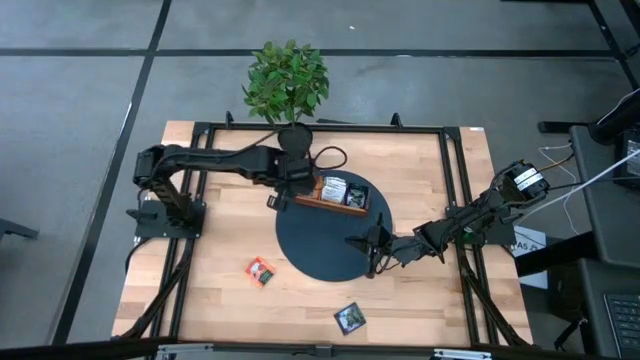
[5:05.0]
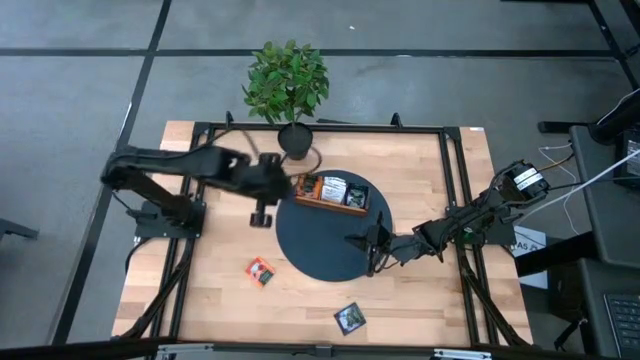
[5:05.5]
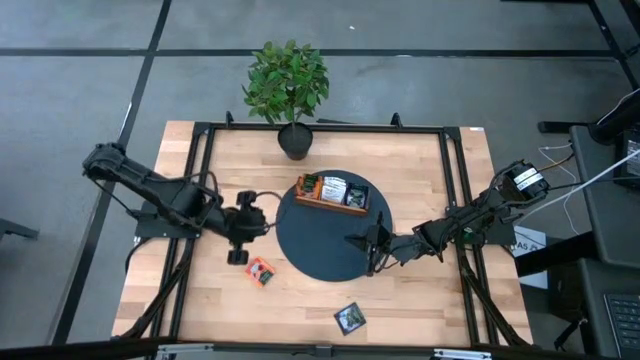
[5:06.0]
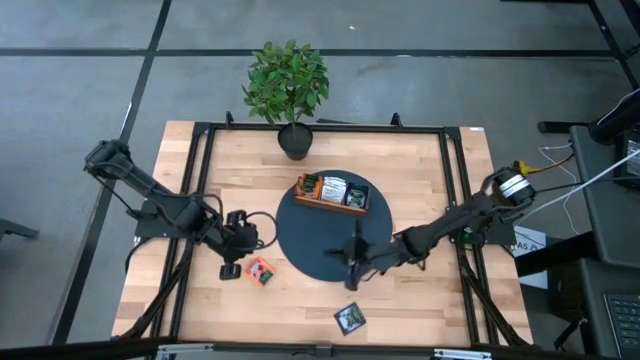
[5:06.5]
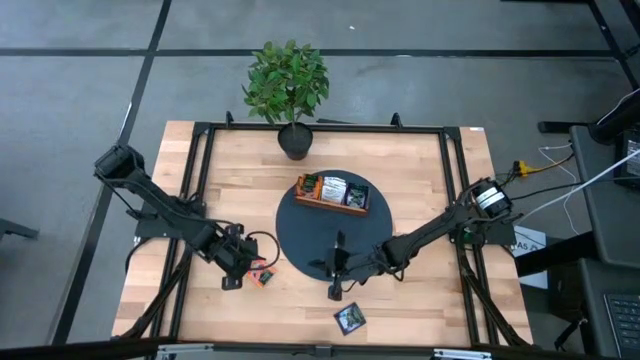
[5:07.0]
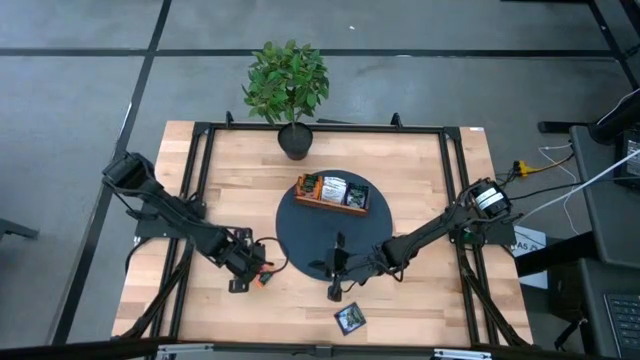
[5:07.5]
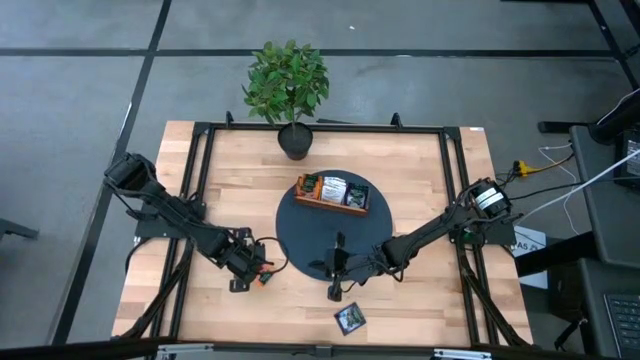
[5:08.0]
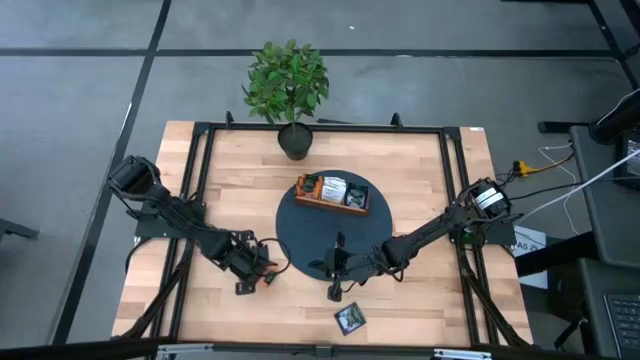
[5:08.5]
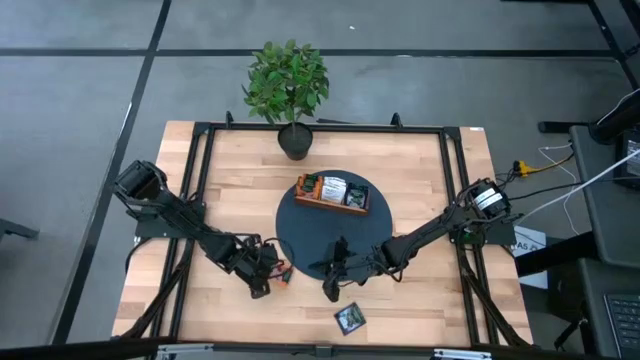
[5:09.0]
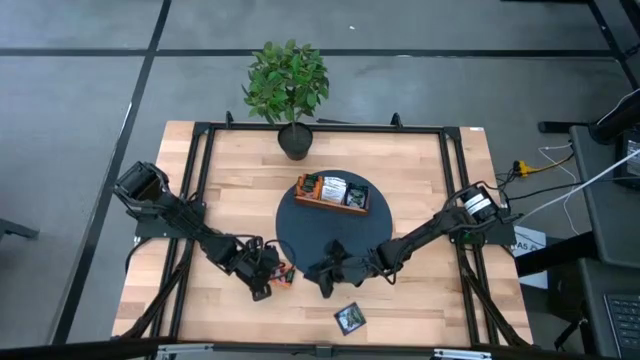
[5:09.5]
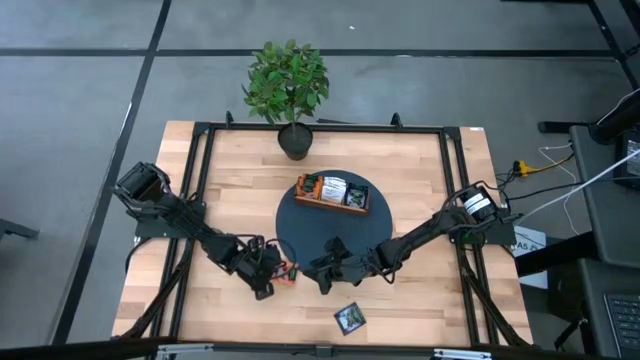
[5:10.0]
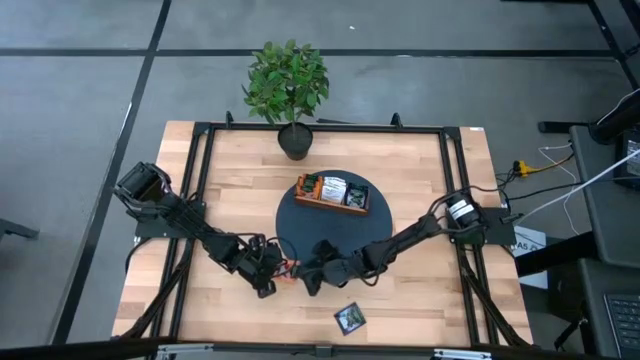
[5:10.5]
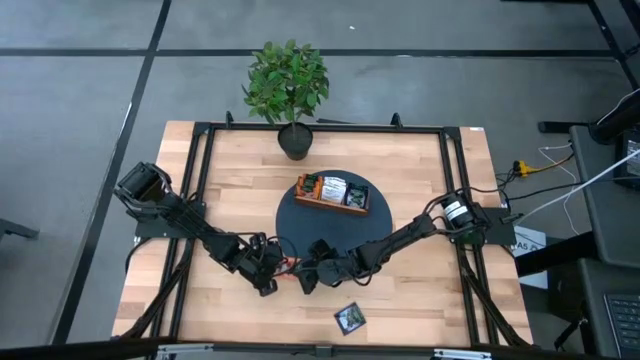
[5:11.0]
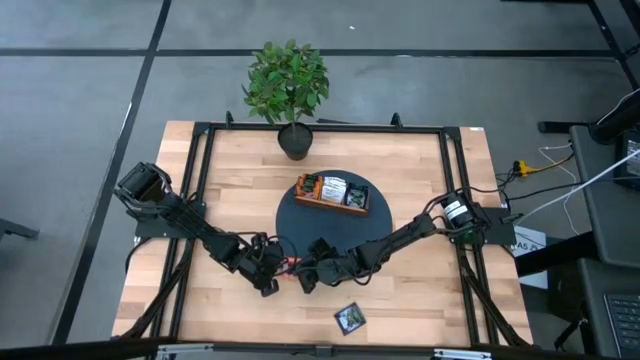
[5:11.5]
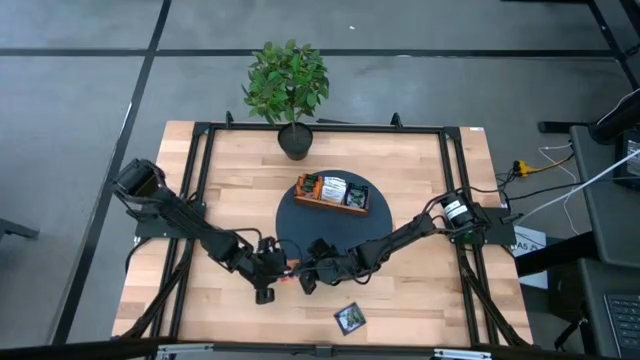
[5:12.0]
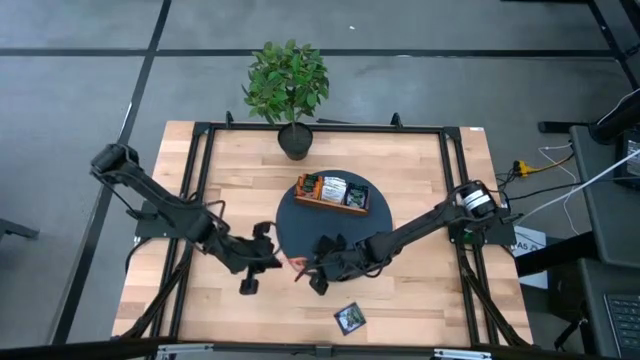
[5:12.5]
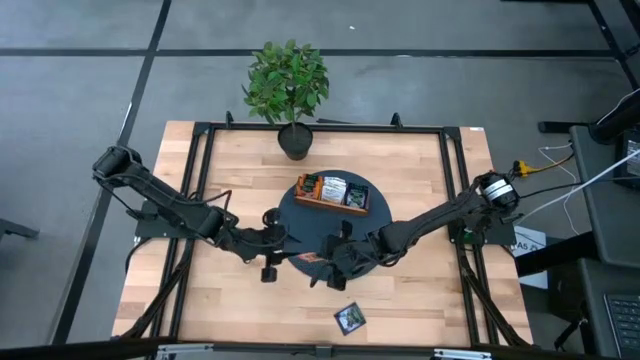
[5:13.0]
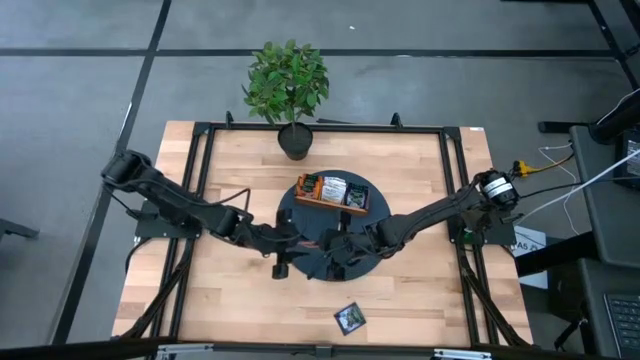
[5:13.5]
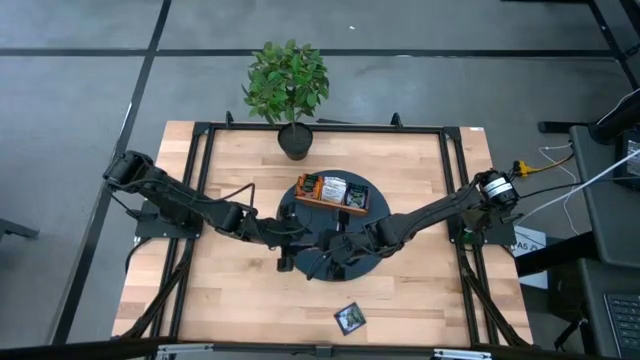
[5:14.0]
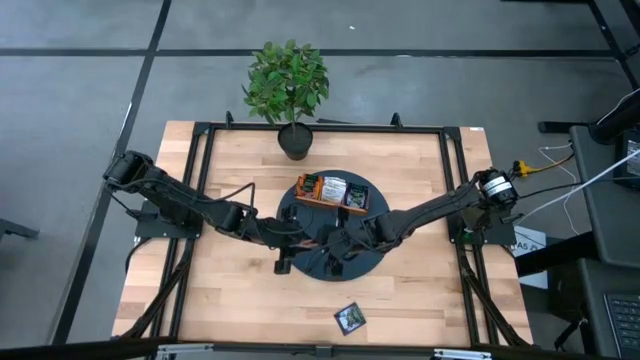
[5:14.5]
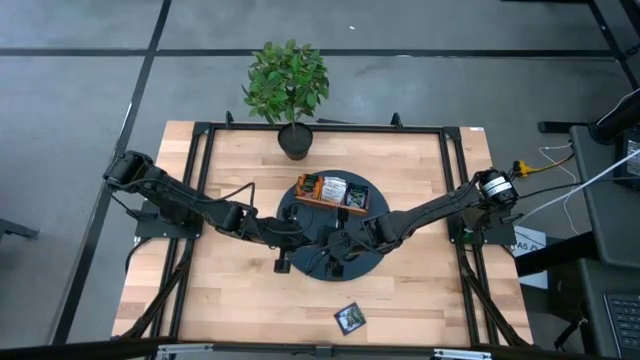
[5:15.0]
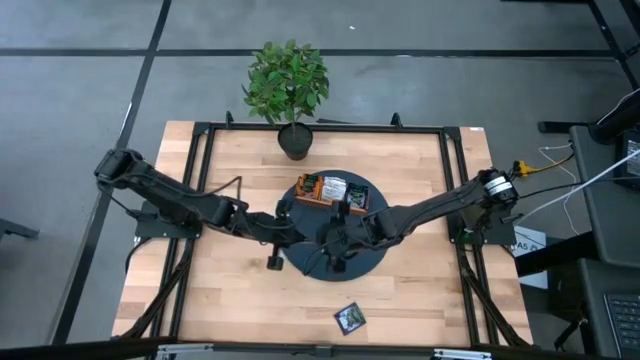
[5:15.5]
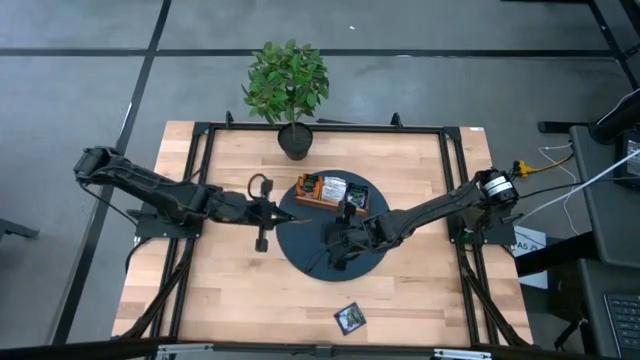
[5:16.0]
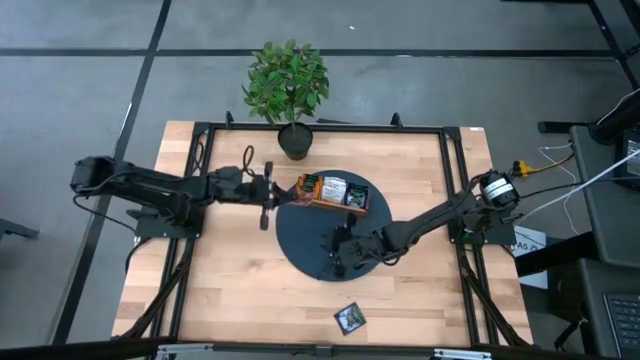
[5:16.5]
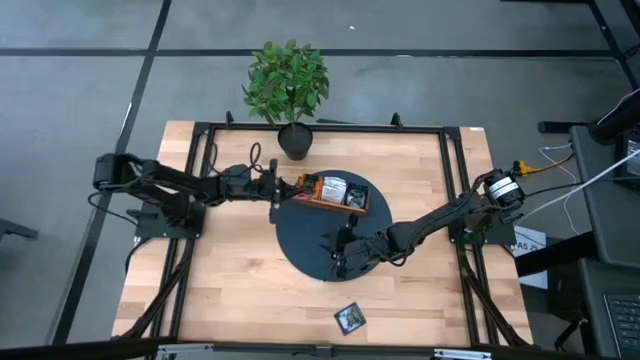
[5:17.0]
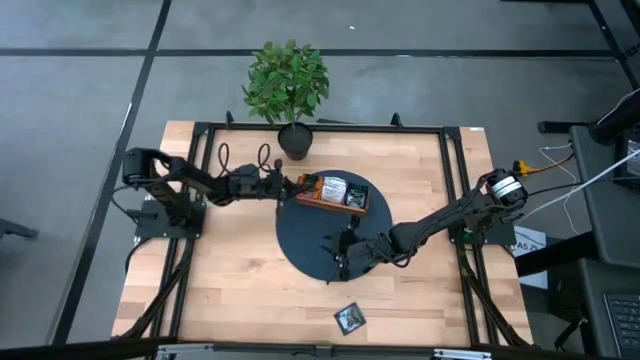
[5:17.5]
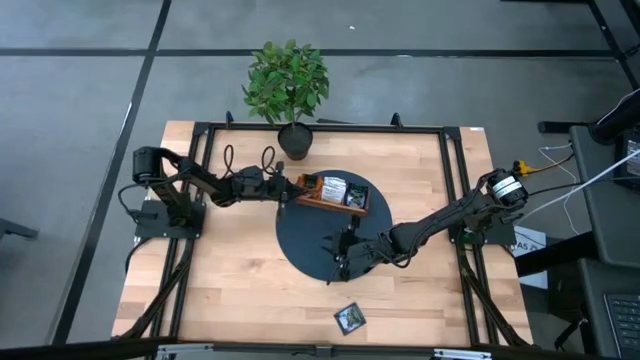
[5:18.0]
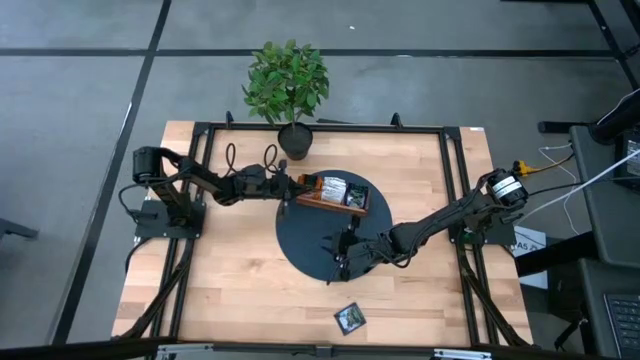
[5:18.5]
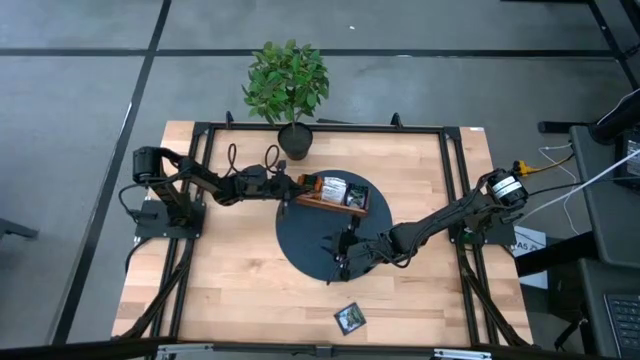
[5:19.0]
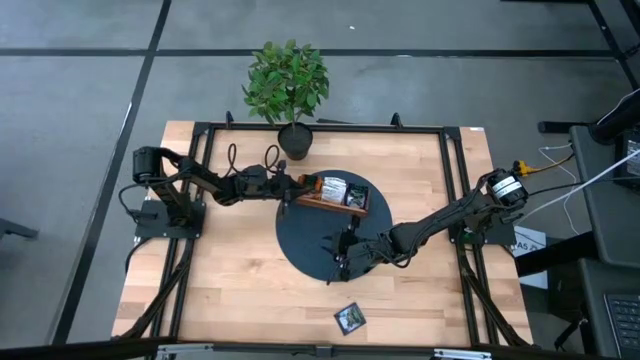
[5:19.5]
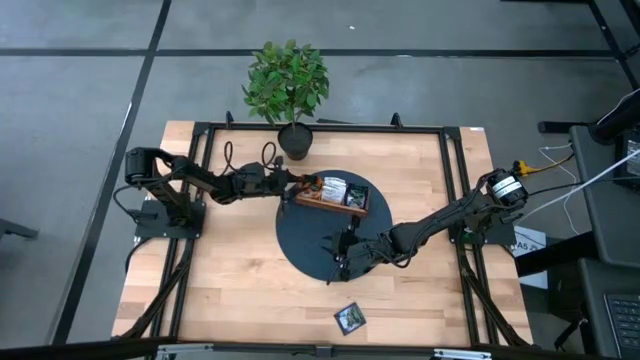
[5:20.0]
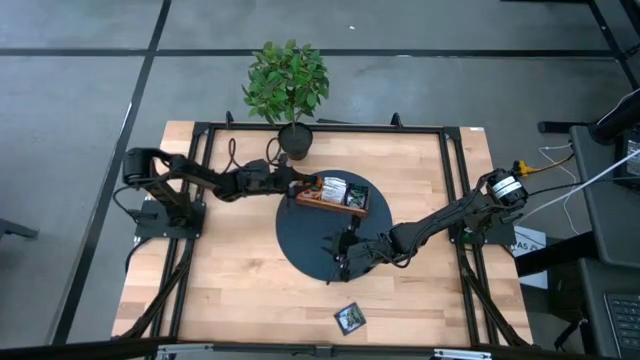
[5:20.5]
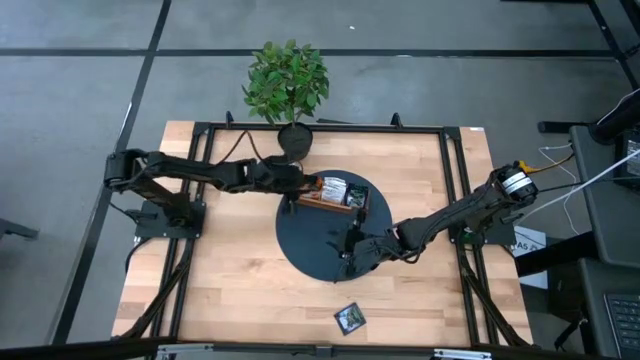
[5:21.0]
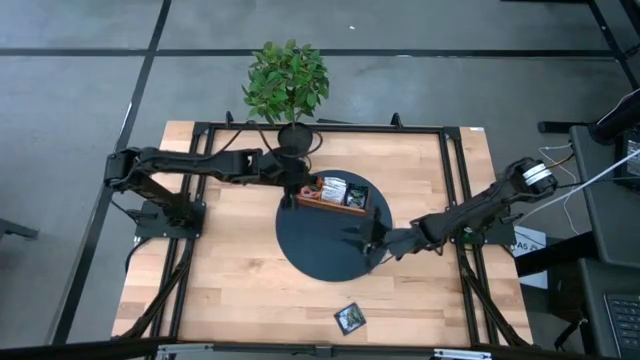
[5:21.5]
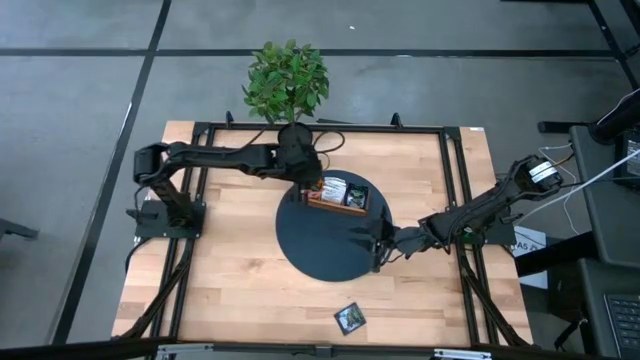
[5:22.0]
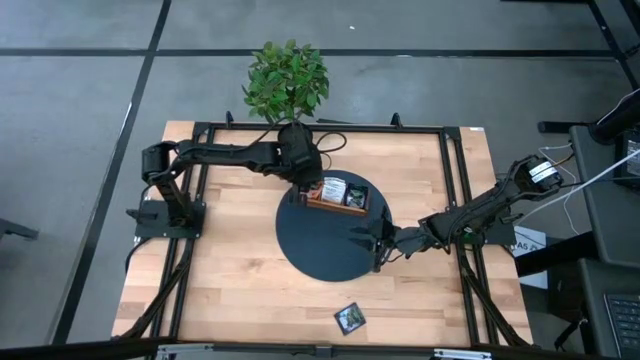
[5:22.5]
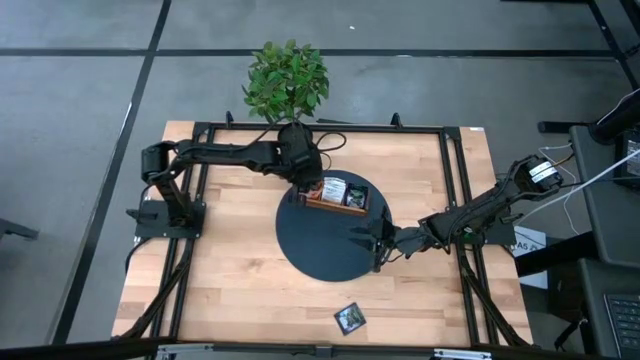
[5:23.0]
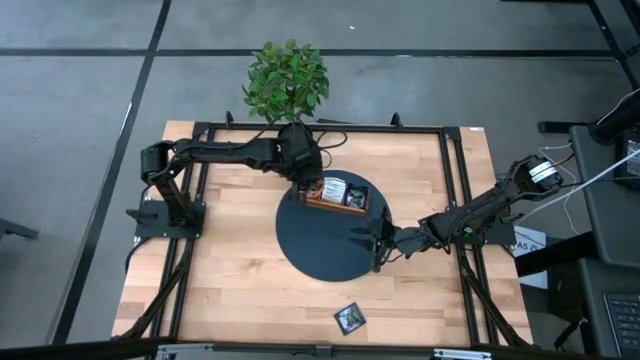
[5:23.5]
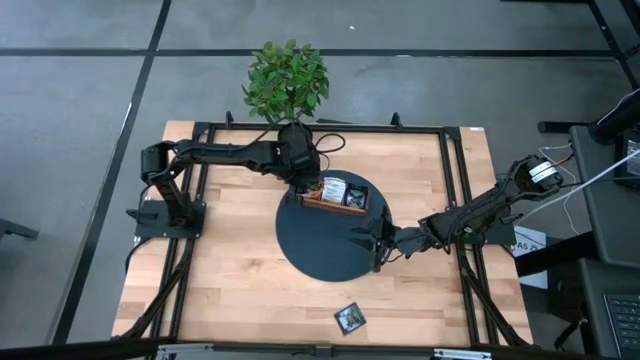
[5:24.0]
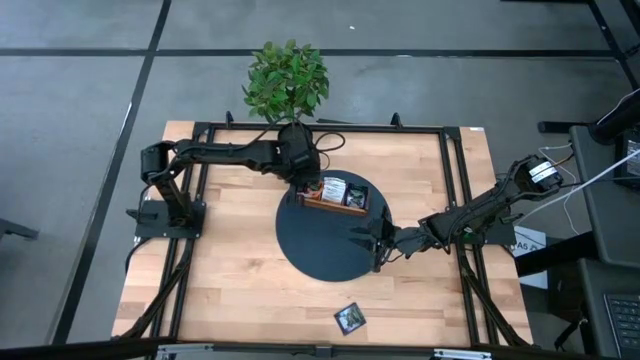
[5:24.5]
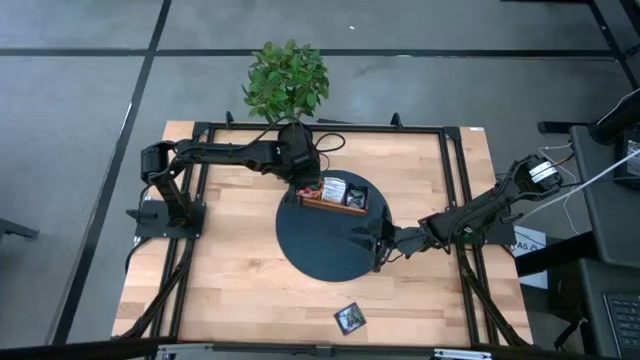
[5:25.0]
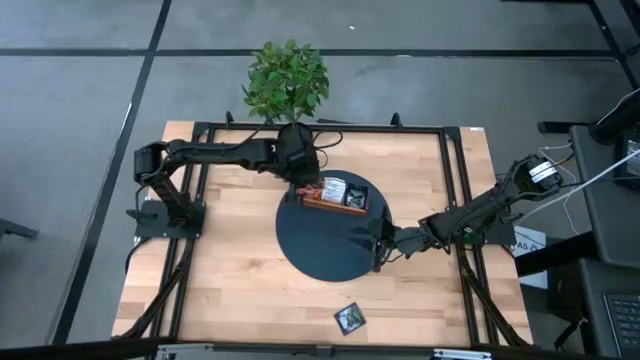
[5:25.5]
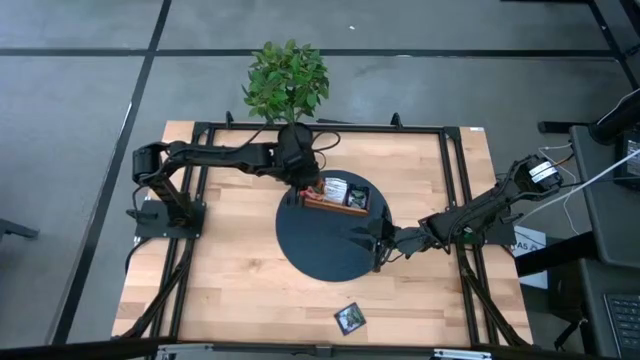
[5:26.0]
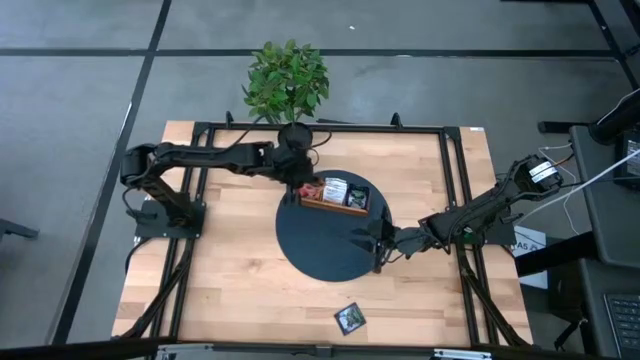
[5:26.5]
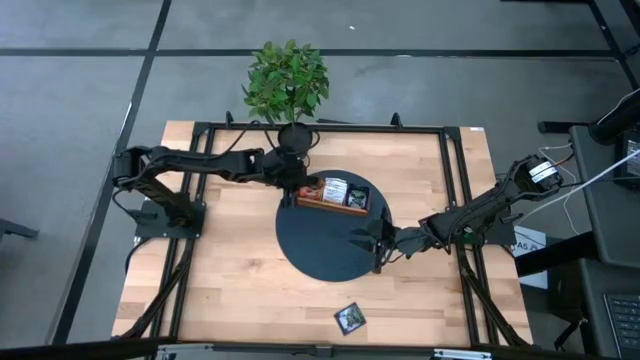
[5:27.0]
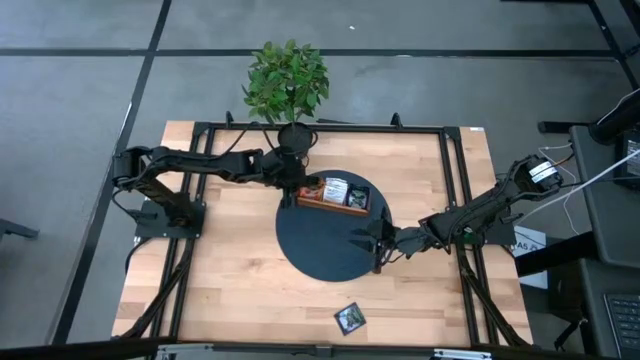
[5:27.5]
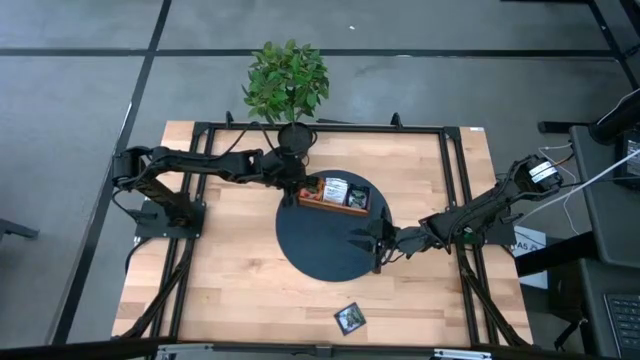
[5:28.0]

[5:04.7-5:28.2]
Task: Pick & Place Tea
Put the orange tea bag into the left side of the wooden organizer
